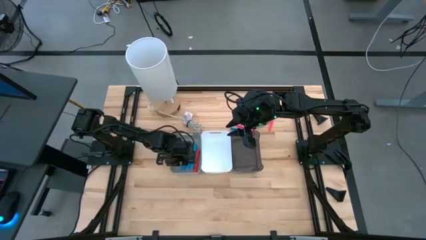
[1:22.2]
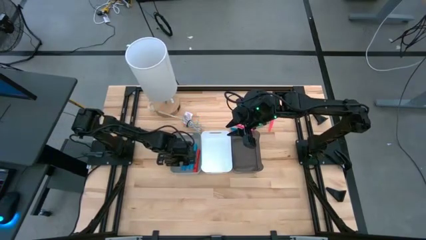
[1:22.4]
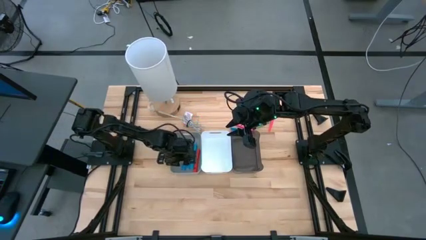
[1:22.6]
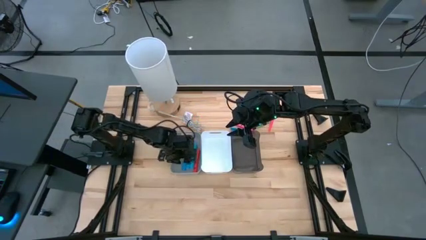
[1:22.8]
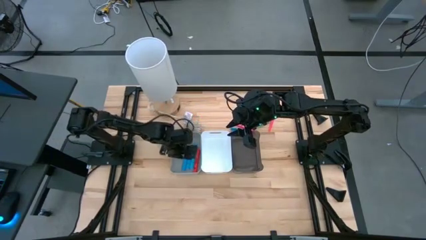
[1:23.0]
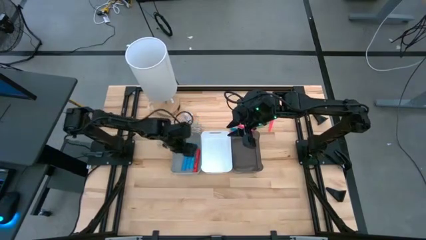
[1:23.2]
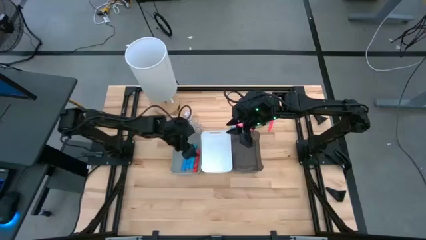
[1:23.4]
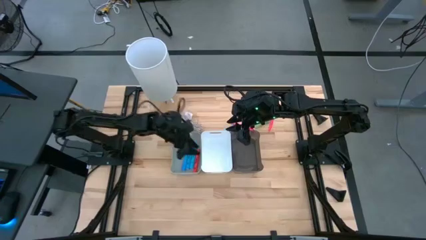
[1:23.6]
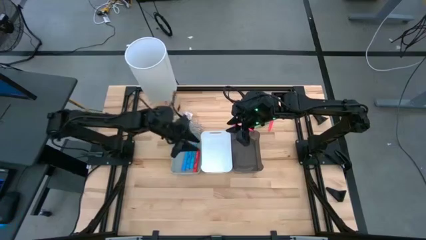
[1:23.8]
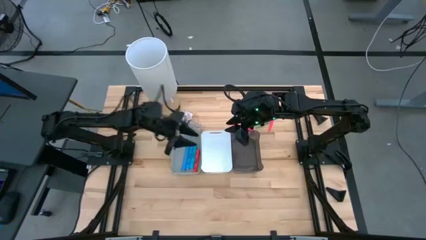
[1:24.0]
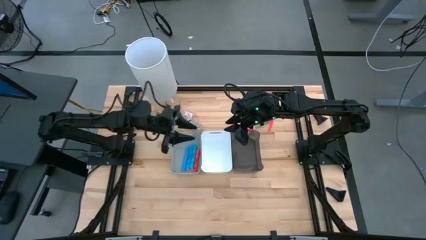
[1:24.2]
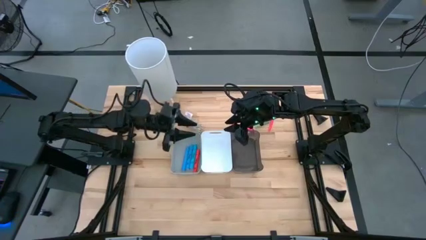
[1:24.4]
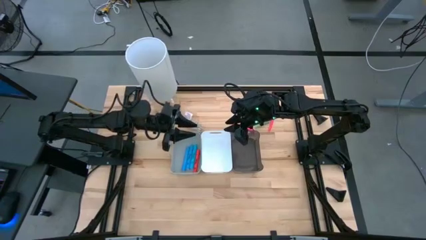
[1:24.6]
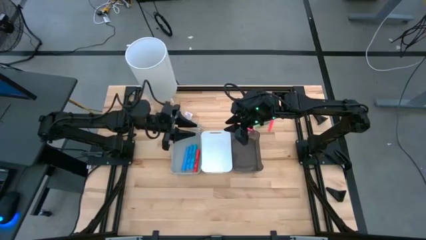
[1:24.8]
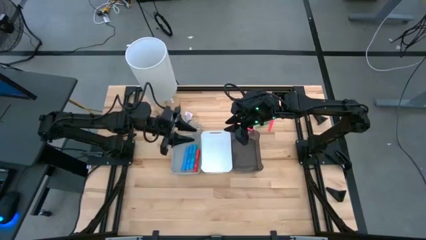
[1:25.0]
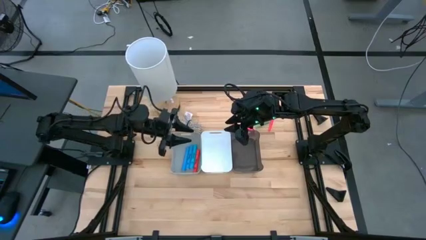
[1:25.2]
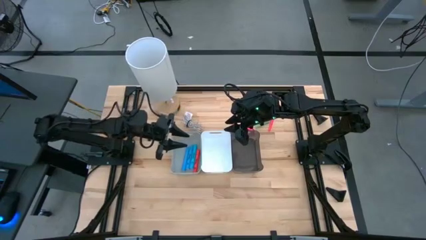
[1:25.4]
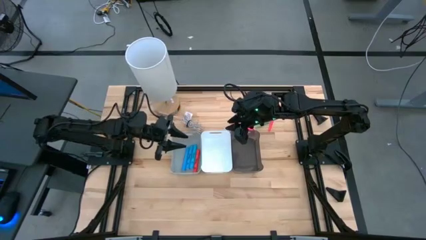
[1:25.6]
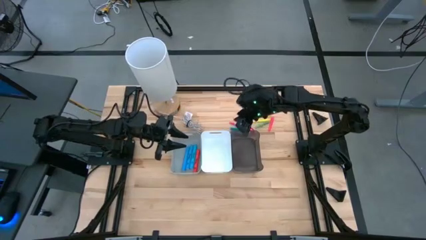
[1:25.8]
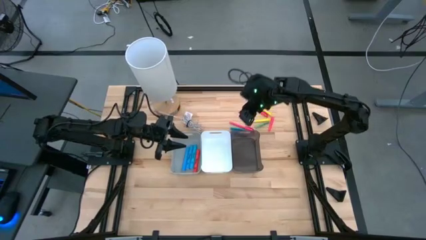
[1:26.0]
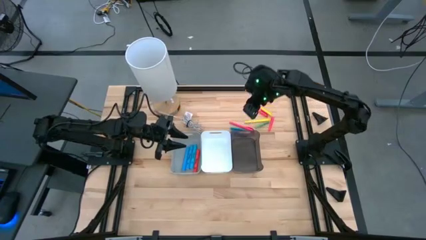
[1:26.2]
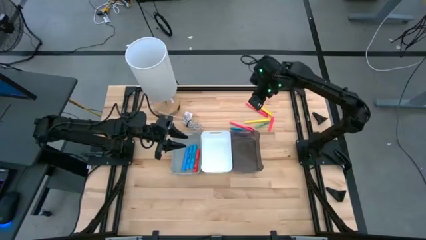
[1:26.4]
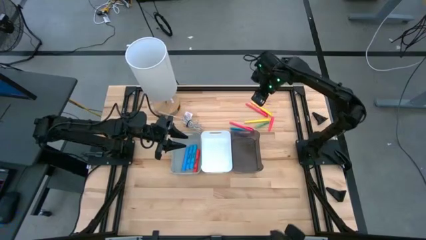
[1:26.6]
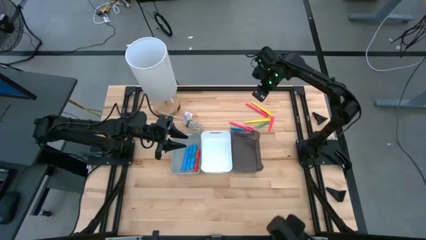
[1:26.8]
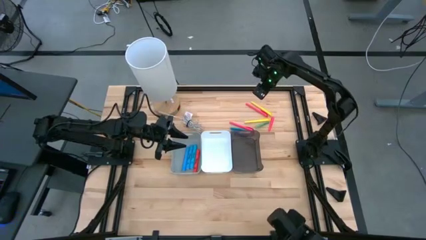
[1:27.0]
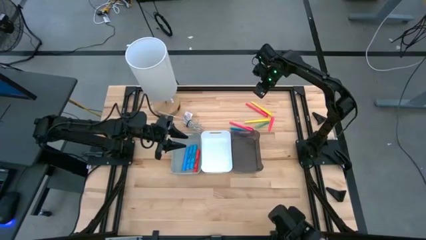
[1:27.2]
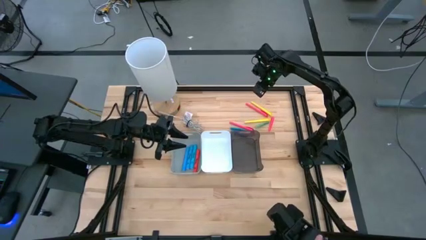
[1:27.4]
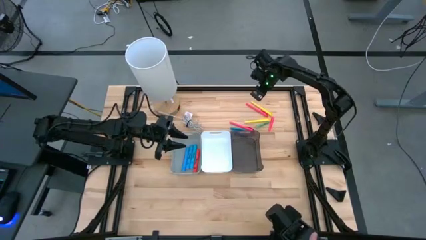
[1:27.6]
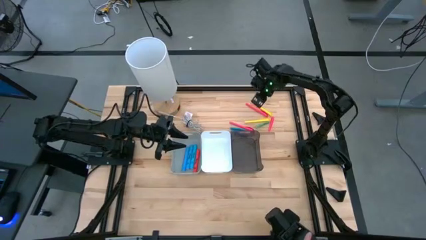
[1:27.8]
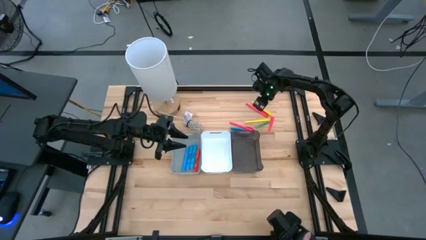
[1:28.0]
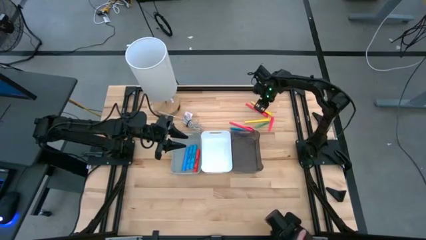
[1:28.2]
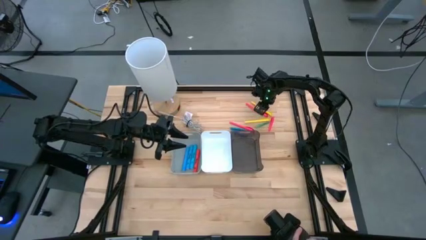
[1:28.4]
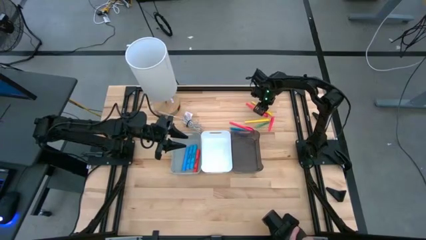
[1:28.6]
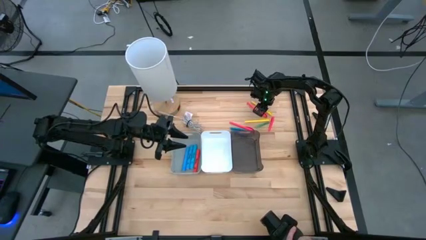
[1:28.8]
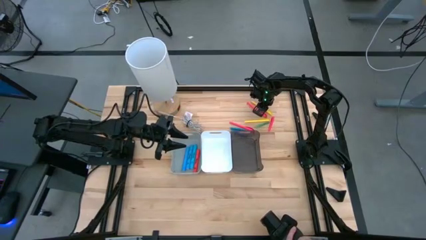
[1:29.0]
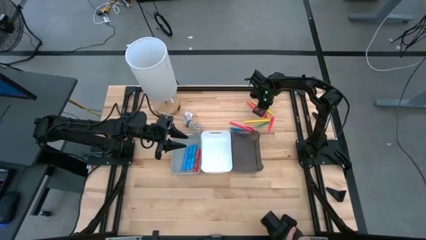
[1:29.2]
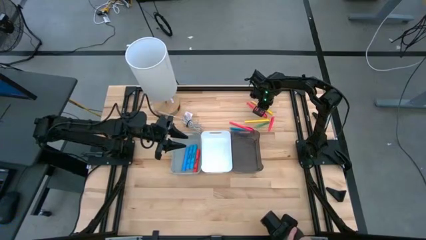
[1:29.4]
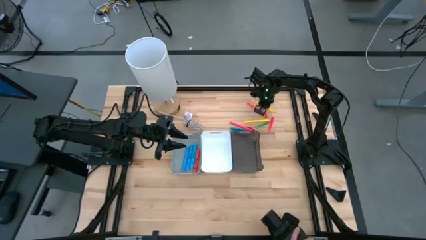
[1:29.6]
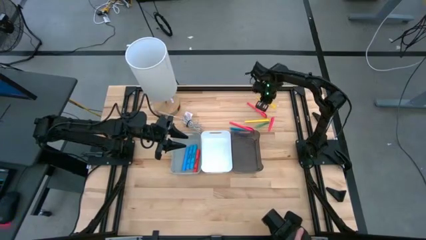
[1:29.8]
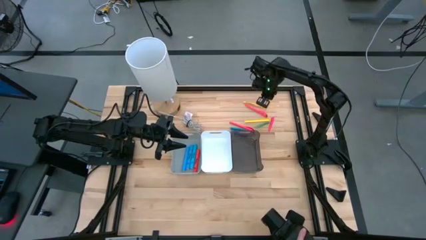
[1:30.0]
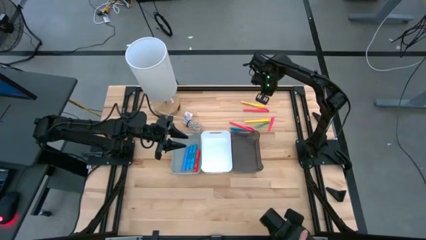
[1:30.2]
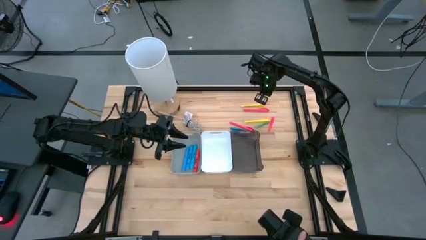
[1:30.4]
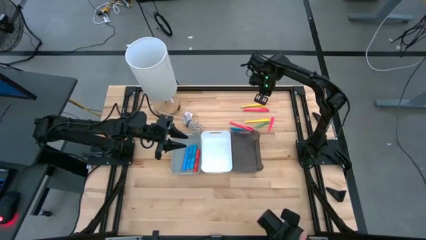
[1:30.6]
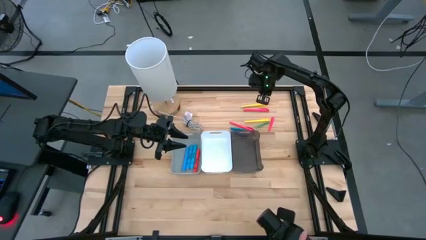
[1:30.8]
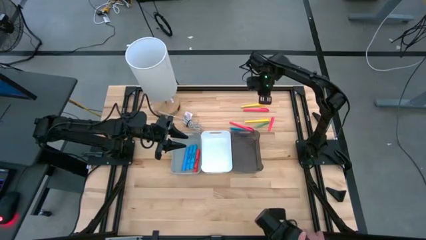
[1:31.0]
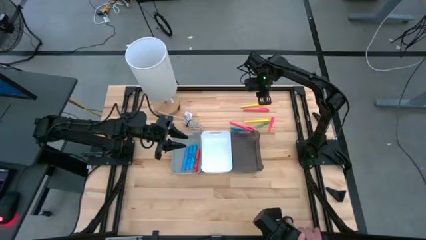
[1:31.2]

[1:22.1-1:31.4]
Task: Pick & Place Markers
Put the top yellow pen into the white bin

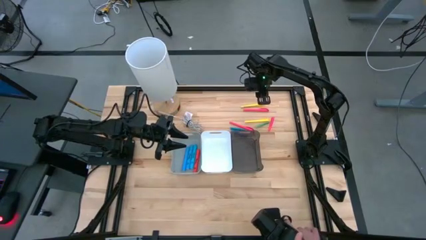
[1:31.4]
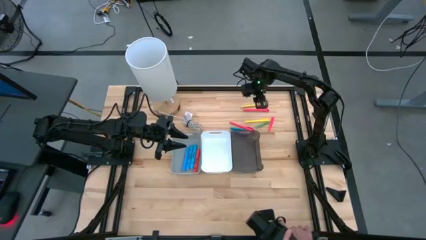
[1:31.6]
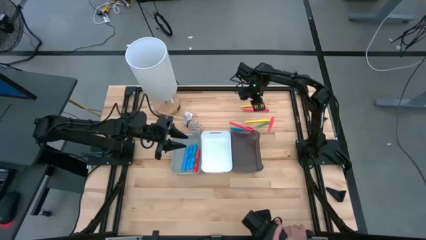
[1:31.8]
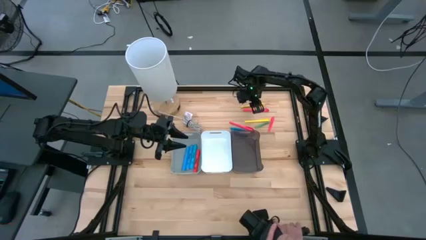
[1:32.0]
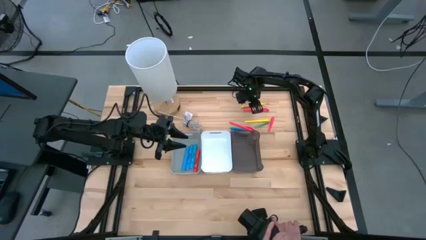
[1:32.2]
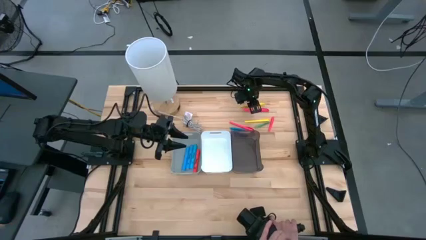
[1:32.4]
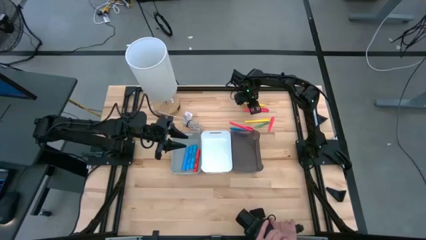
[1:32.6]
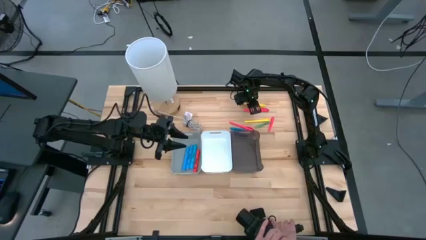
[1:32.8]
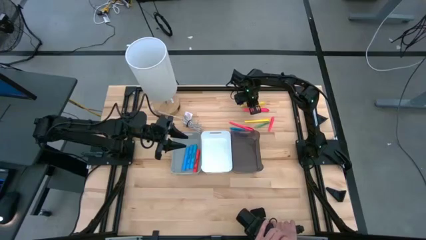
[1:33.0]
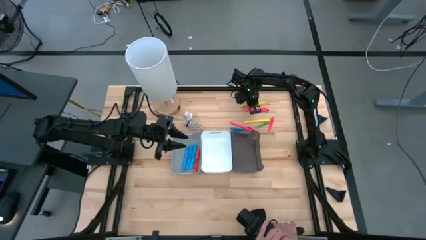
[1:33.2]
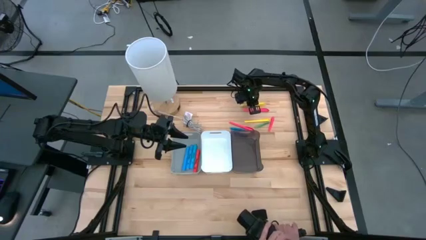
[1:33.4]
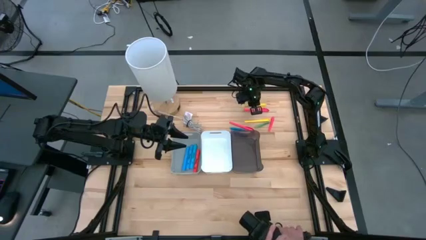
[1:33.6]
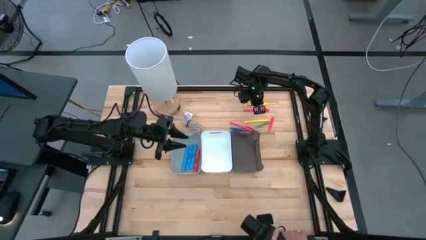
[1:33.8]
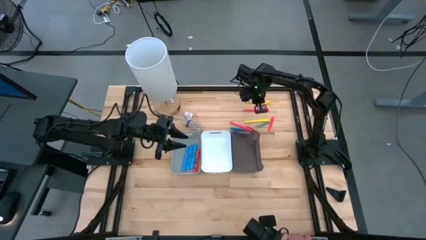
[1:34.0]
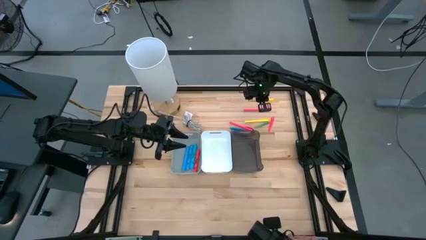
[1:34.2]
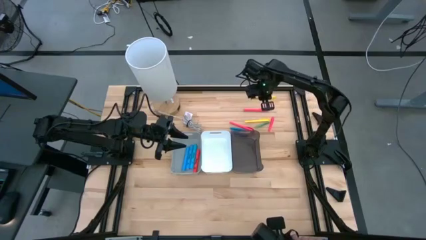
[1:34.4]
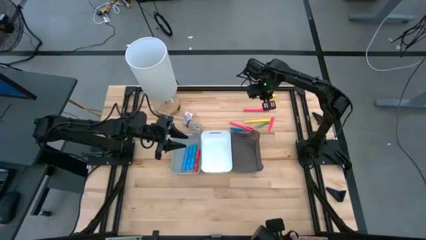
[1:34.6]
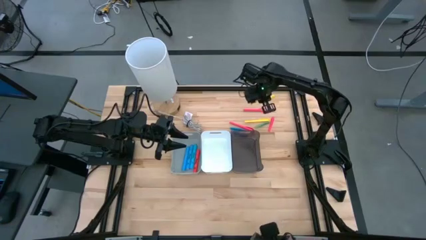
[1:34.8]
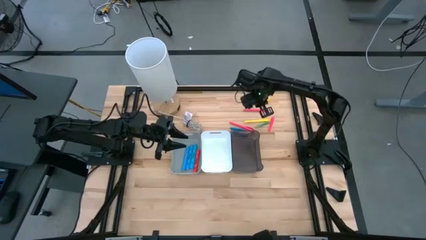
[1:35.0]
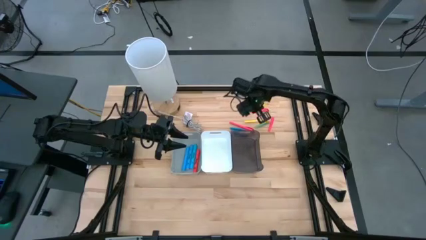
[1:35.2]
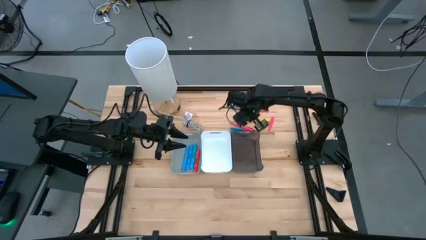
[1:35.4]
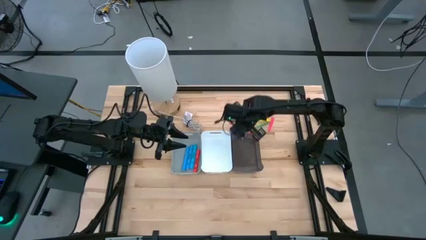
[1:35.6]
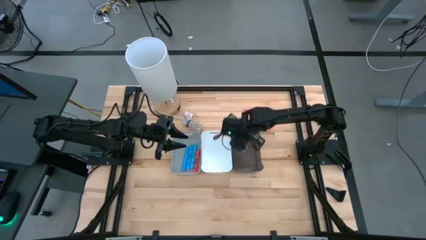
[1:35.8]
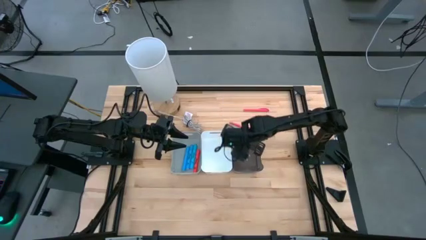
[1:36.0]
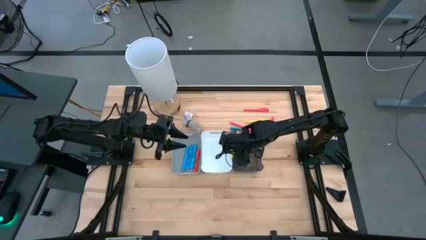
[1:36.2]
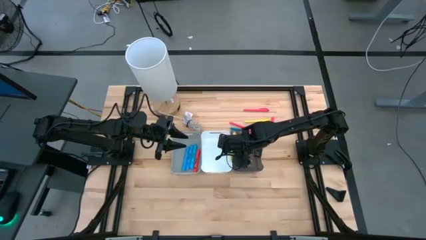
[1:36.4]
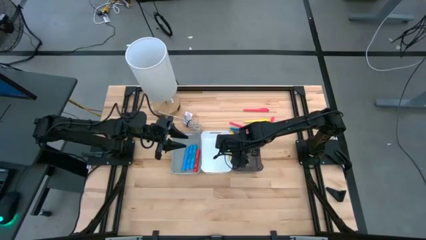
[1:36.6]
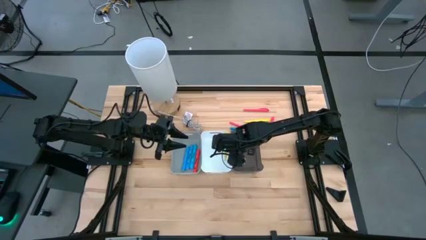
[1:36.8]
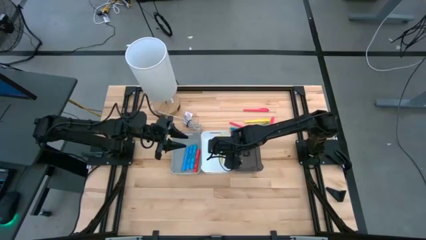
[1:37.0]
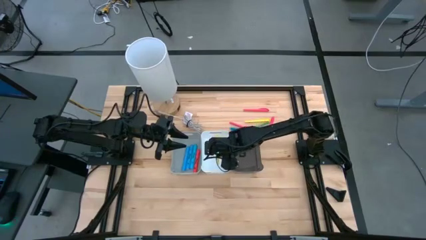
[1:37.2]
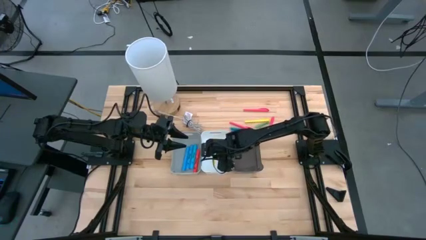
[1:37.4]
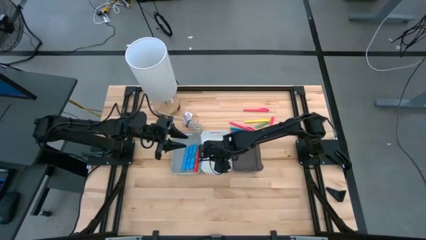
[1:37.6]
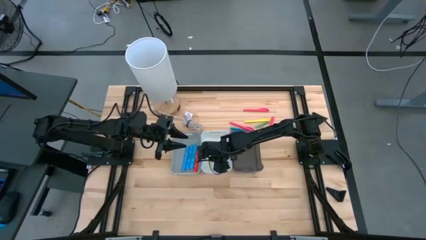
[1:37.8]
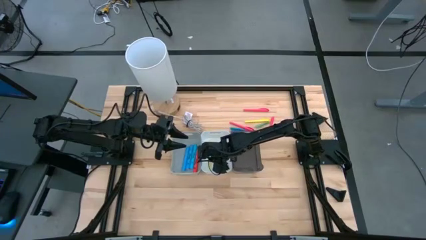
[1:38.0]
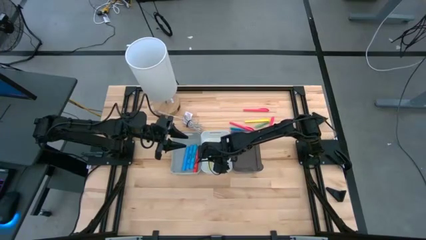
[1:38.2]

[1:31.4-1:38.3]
Put the top yellow pen into the white bin

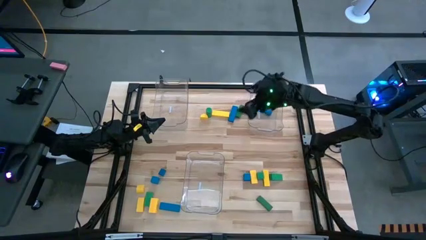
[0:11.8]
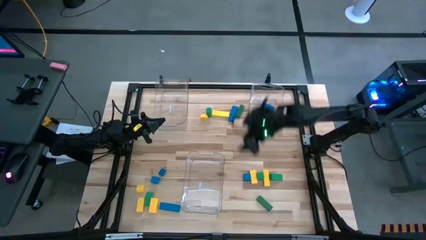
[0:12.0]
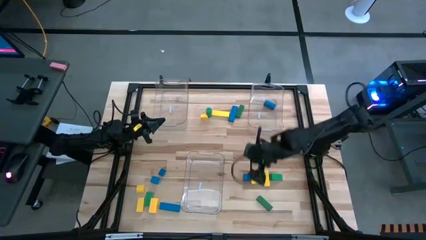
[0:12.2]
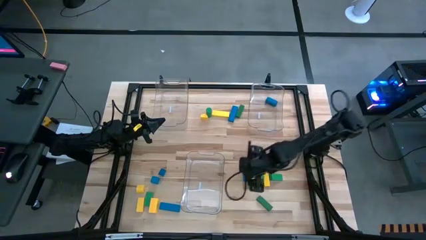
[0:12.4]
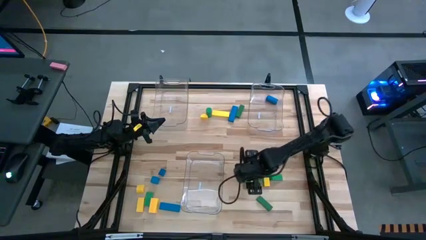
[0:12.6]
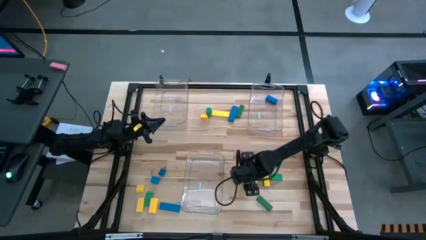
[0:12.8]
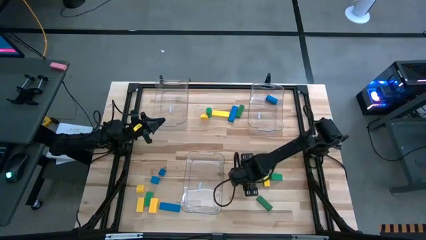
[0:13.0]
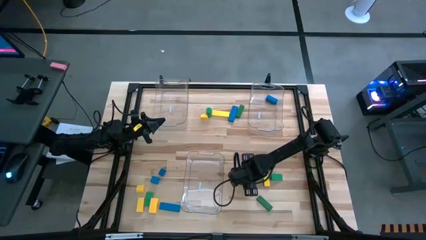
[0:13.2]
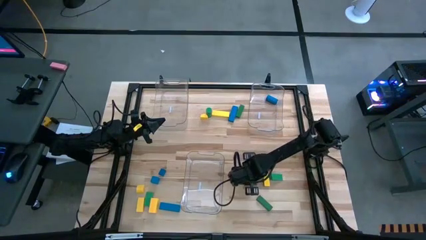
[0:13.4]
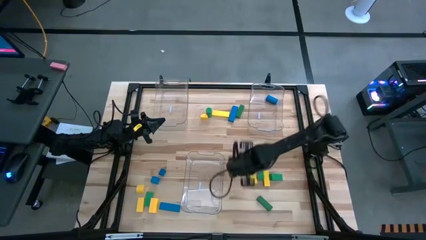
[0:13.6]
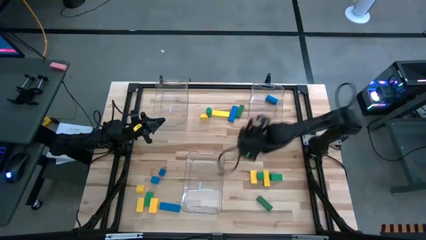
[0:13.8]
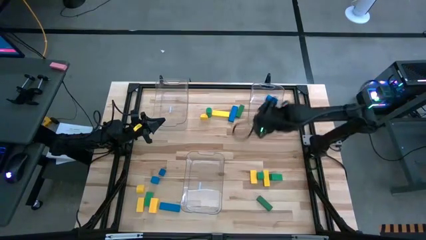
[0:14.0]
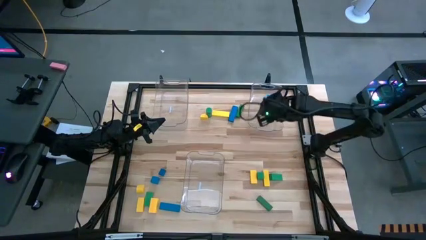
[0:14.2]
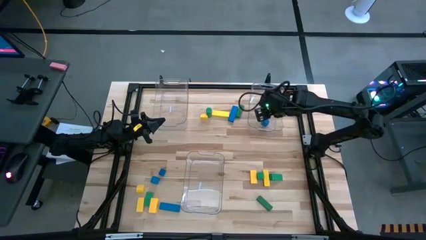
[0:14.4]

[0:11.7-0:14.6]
Task: Sort blocks
Put the blue block into the top right transparent bin
